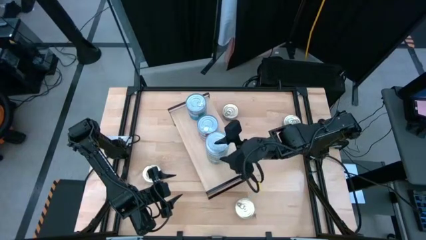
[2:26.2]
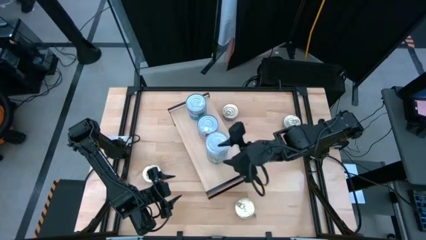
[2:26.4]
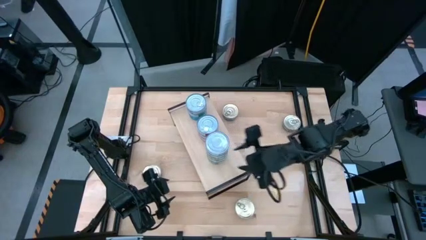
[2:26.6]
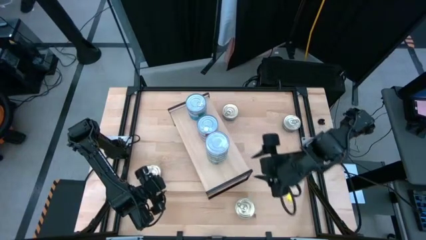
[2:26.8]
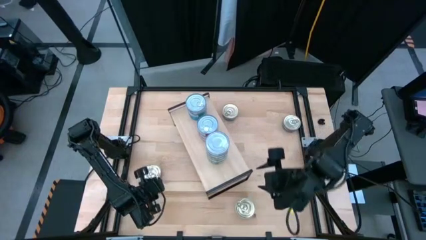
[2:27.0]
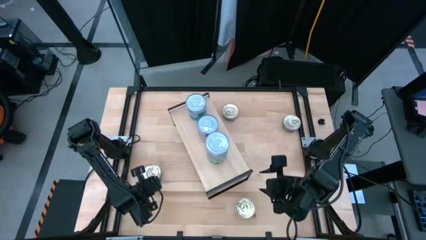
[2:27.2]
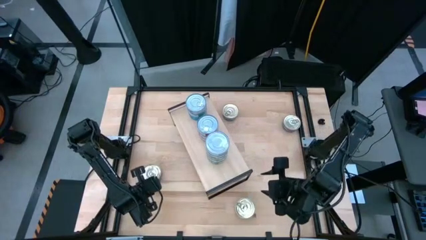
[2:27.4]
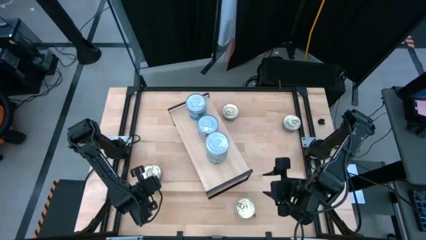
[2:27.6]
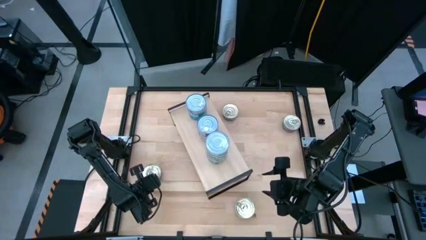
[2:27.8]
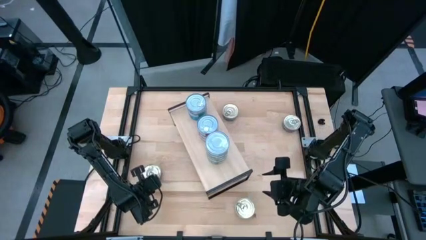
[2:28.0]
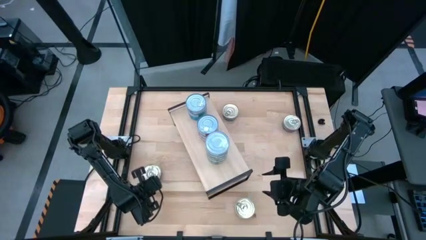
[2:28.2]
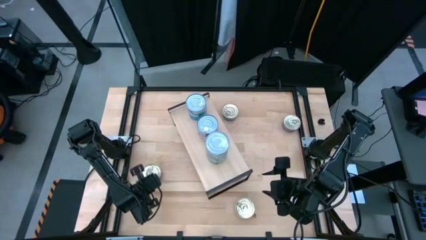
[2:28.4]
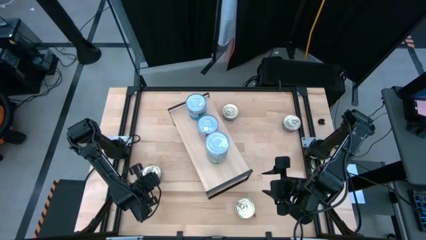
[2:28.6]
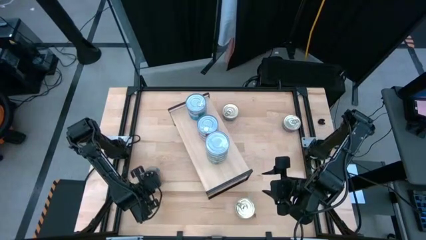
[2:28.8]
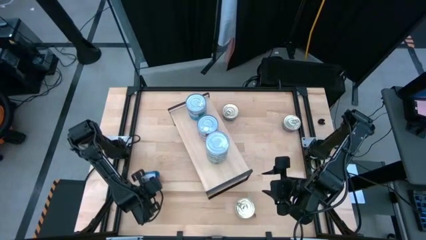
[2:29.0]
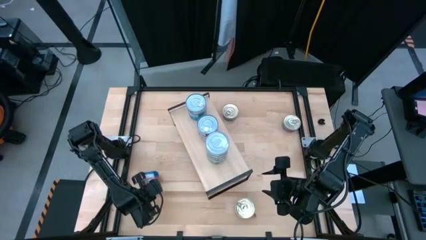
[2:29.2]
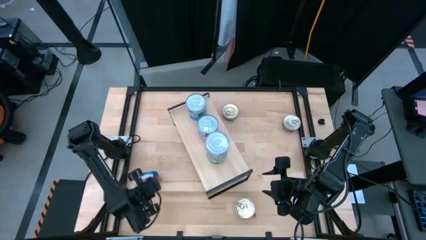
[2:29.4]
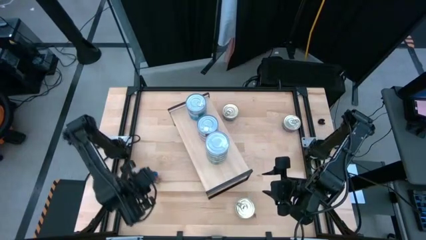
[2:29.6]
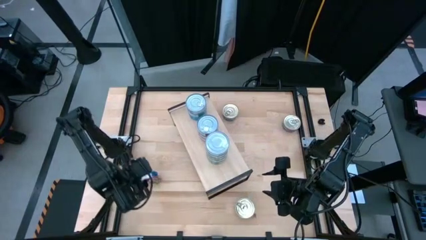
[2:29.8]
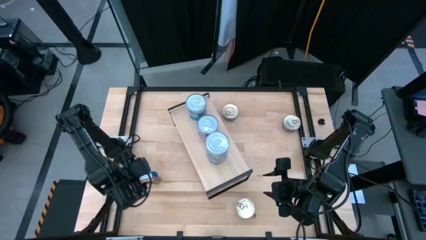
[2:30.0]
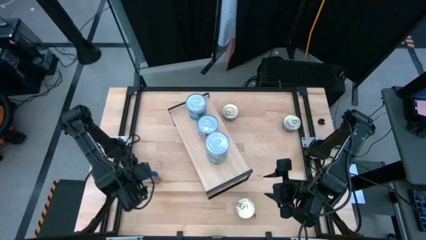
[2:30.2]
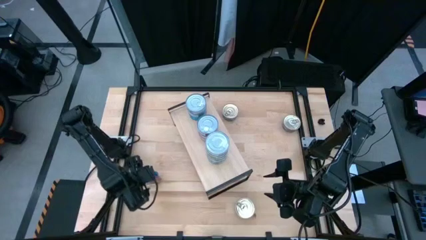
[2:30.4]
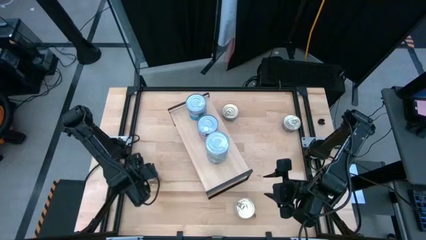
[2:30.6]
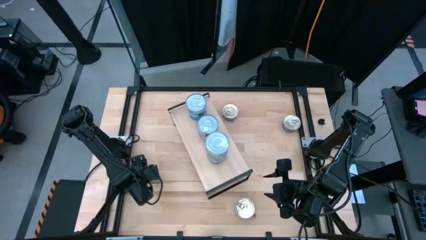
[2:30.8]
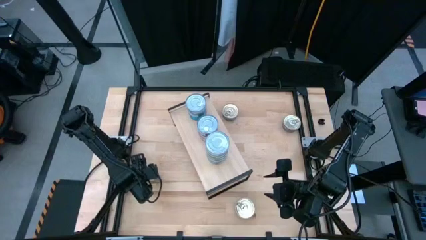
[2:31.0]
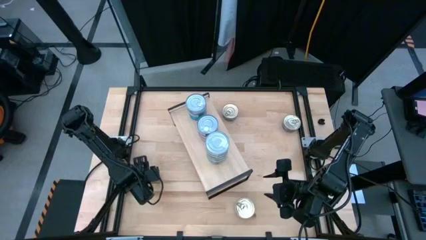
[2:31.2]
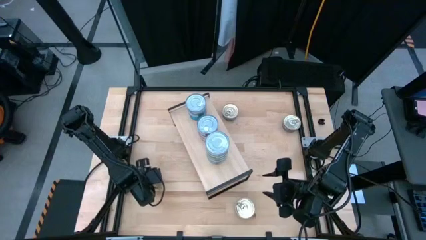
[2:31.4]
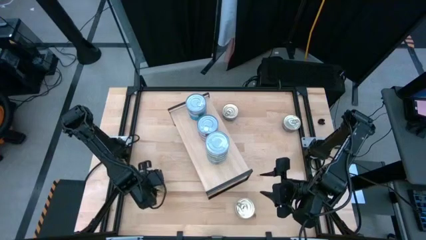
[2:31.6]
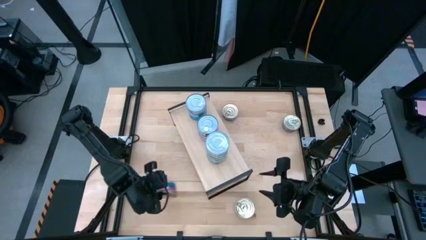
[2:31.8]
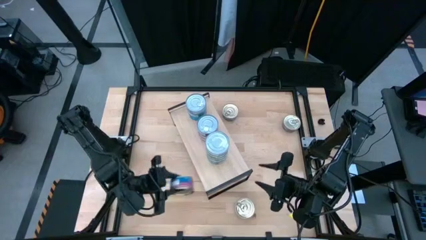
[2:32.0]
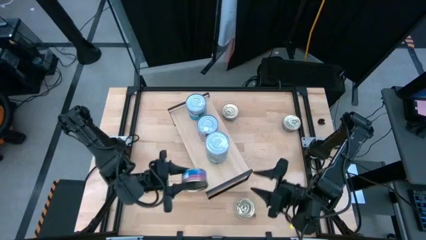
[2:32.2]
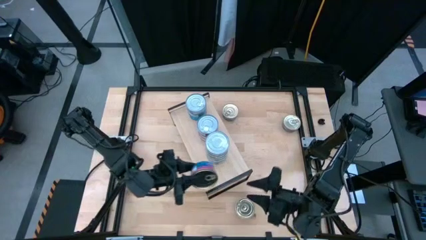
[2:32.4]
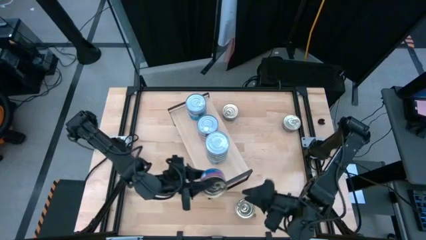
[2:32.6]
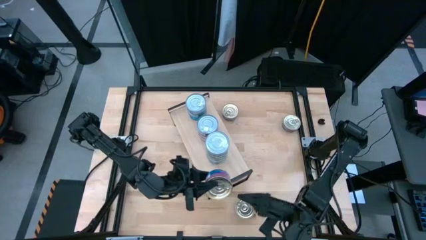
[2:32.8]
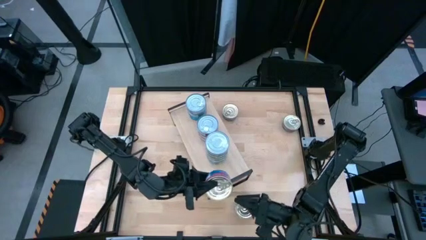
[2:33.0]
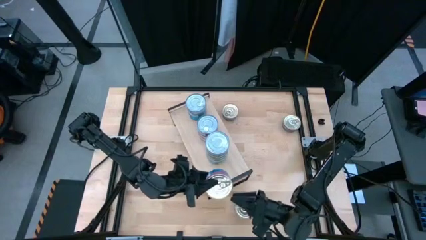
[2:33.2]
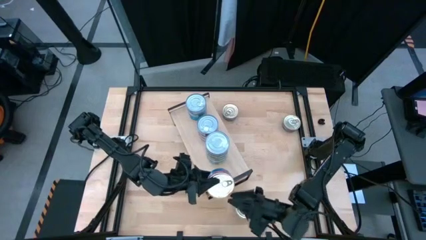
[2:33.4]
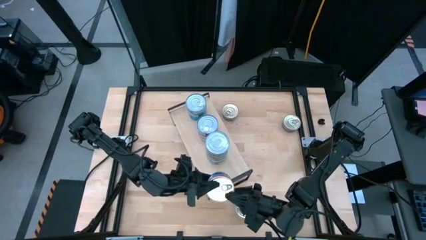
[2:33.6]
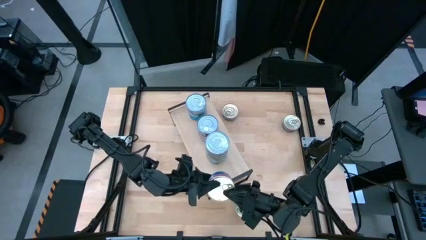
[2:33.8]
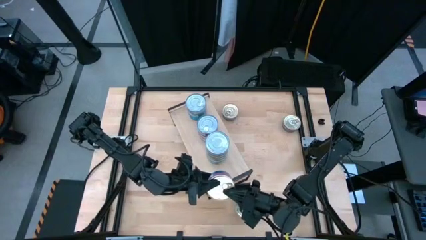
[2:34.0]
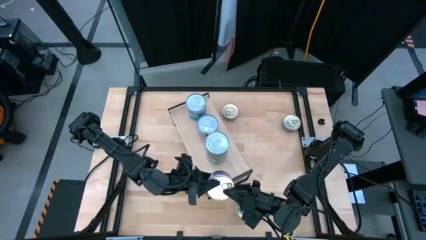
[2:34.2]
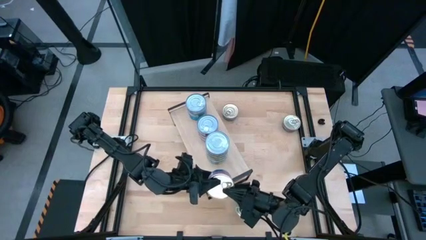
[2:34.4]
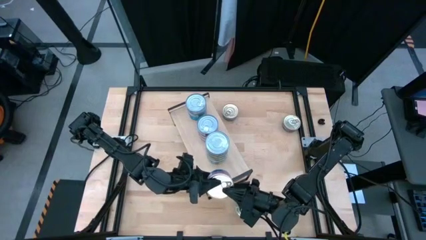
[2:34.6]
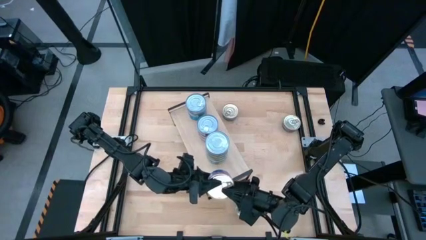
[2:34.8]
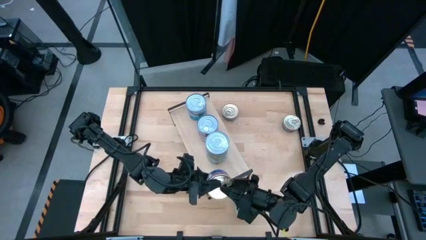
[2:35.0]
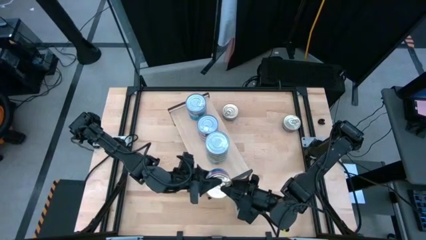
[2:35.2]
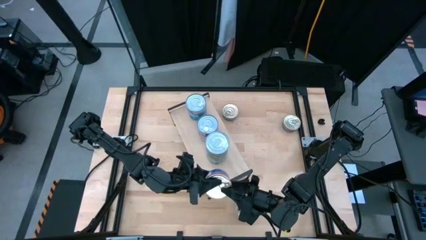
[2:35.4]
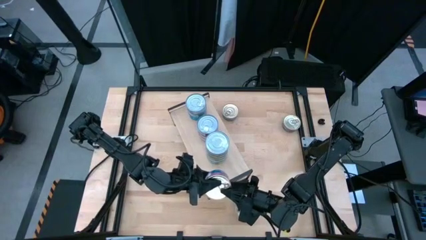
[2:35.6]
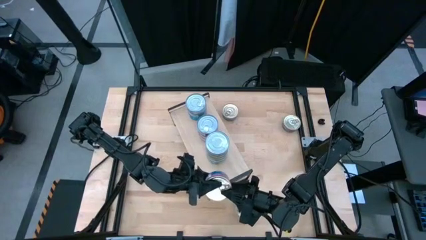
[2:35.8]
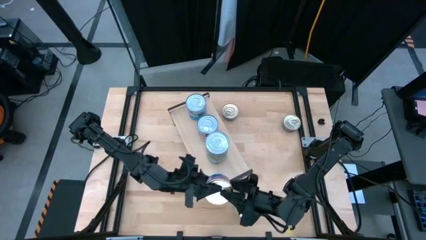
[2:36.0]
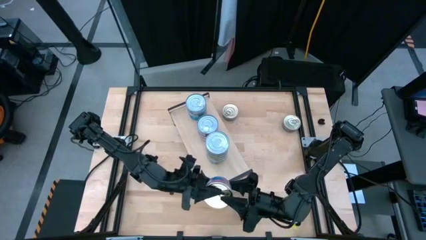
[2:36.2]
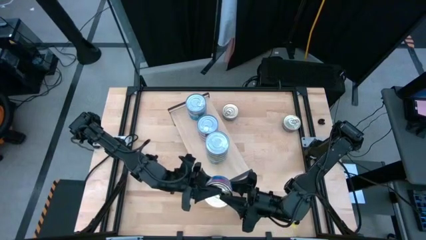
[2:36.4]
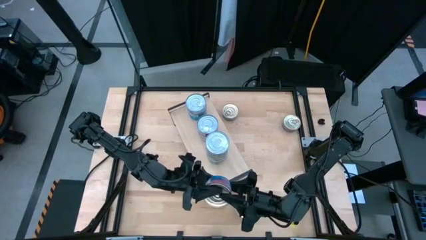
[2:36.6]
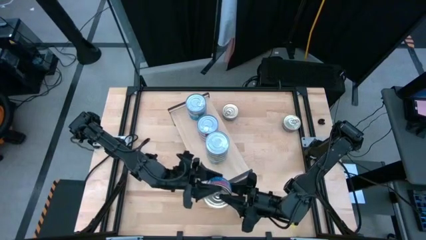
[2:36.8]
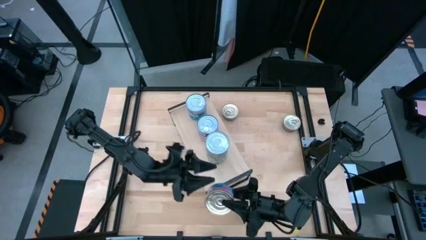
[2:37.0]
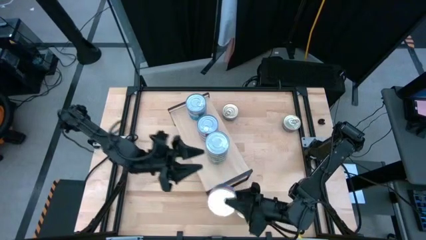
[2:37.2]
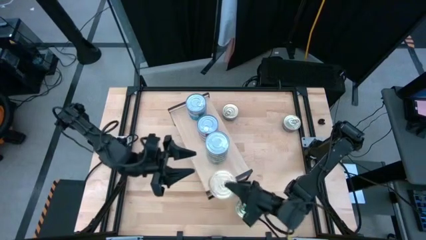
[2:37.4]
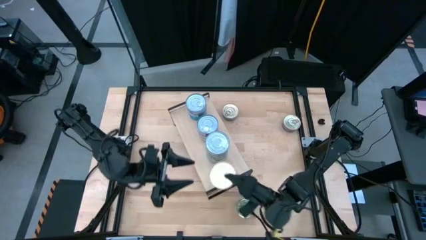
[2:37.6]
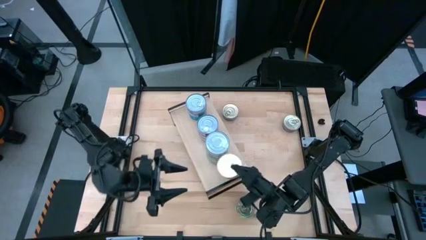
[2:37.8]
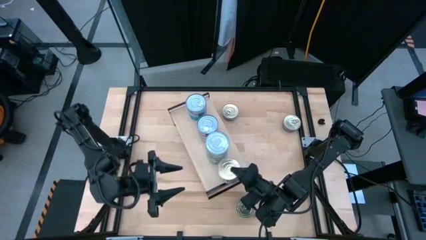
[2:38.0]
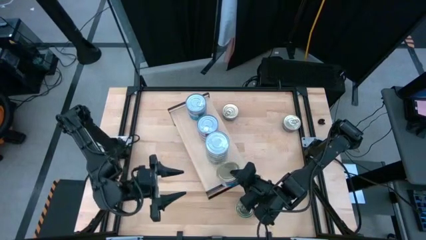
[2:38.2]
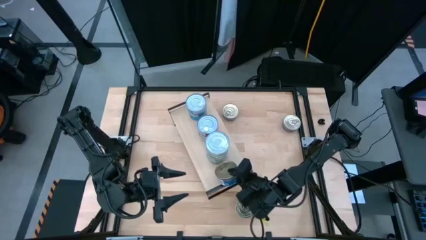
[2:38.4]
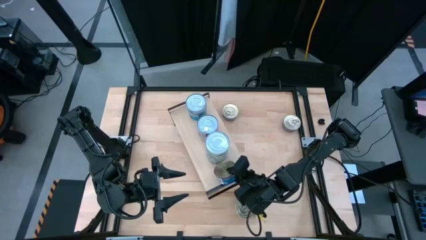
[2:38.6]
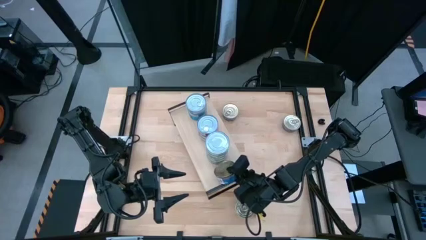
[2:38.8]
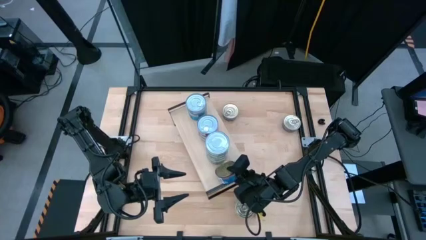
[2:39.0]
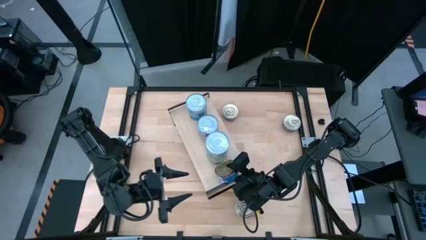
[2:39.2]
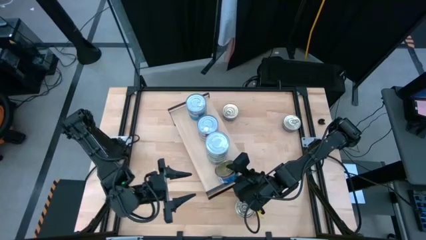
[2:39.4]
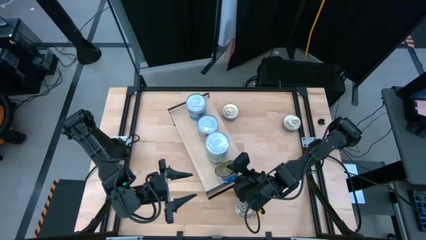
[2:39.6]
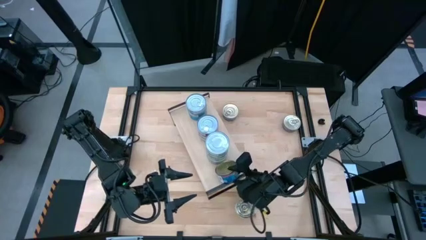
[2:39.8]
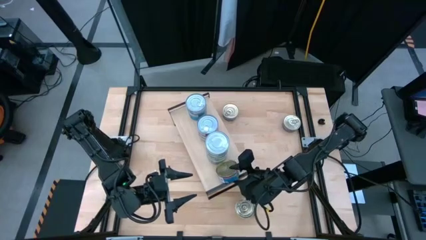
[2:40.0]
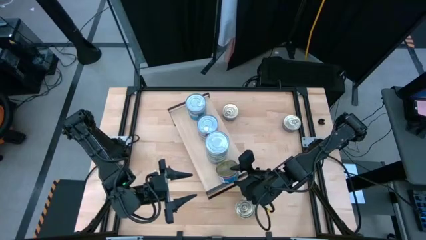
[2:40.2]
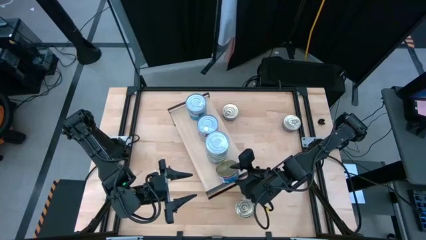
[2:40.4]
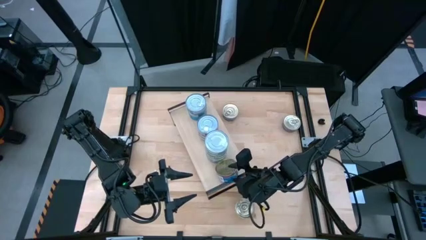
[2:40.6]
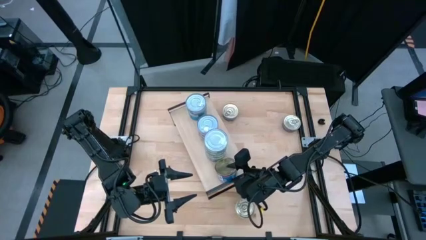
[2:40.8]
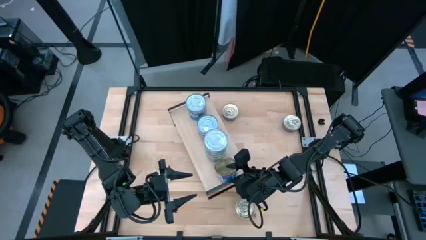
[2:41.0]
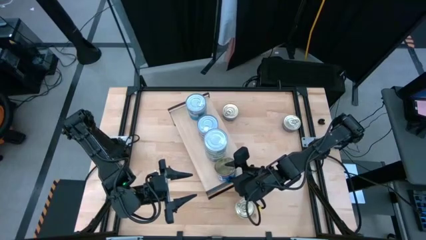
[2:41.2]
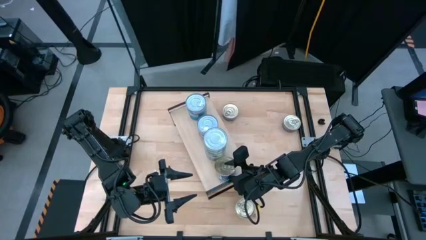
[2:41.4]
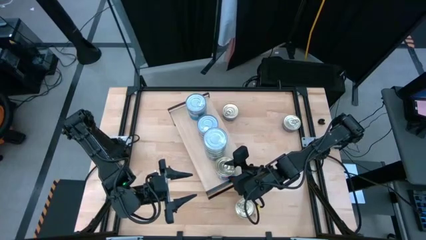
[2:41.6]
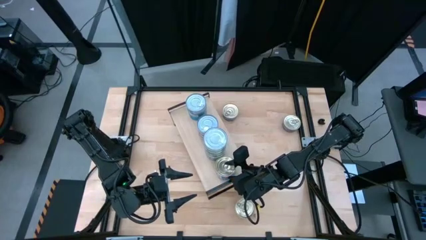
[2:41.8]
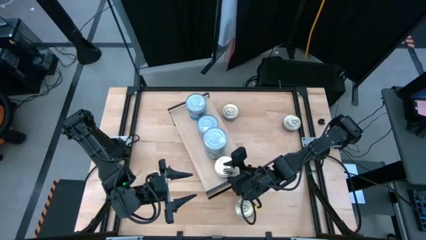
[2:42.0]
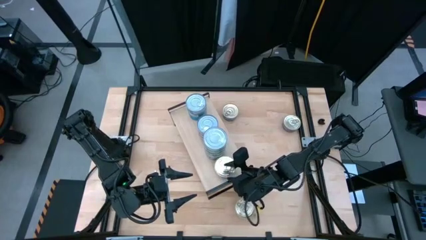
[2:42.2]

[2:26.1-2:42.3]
Task: Stack canned seafood by type on shelf
Put the blue-pink tuna can on the shelf

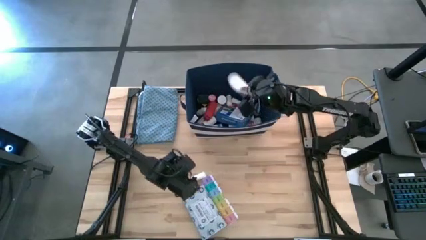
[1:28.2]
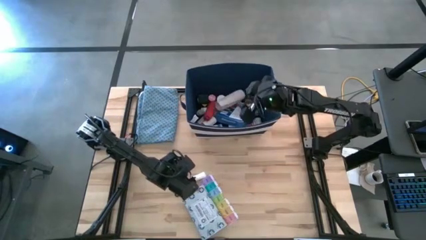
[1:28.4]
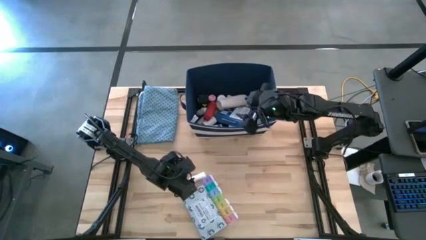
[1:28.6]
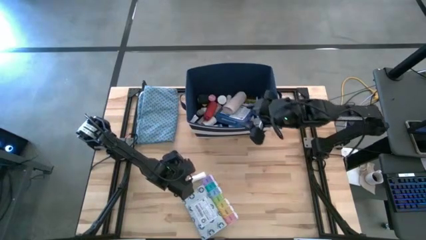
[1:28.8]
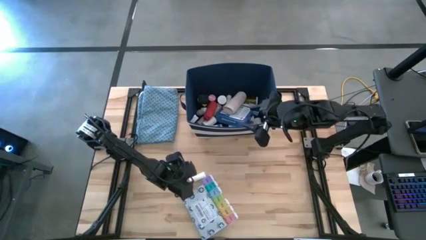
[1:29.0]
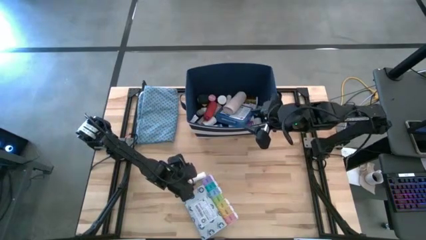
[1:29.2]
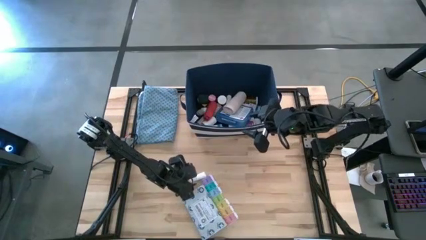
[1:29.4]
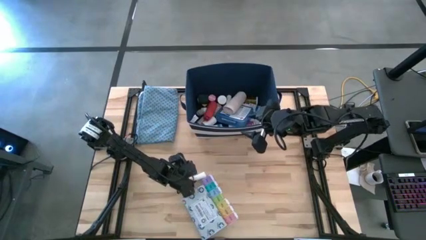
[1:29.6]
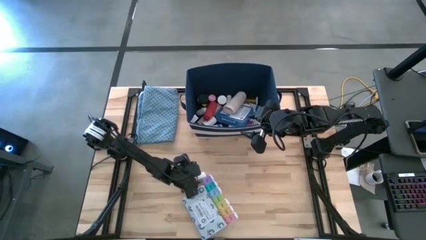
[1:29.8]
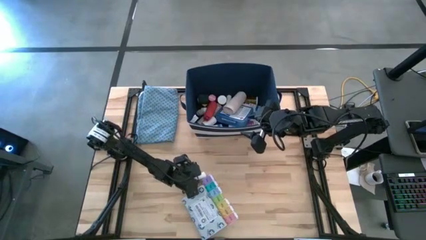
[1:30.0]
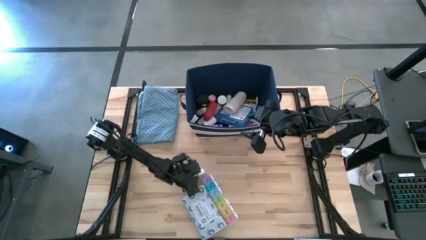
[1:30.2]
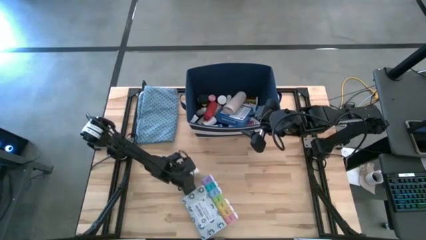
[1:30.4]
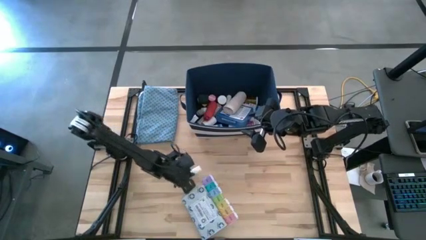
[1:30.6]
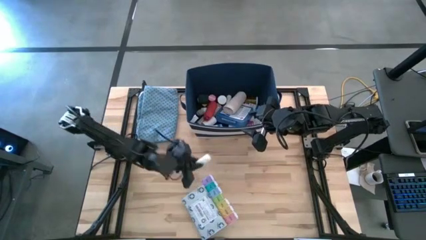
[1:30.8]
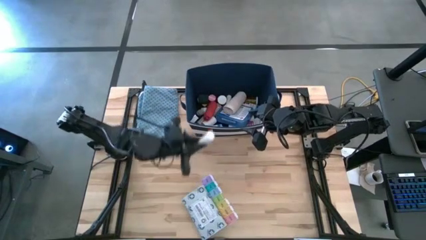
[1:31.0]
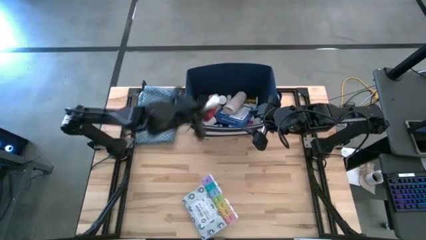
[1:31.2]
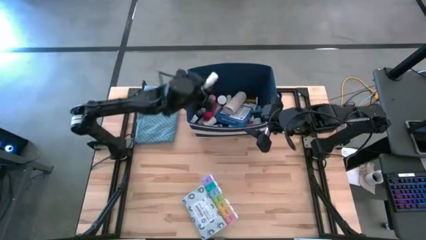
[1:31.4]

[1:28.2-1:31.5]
Task: Pick & place medical supplies in basket/bin
Put the white bandage into the blue bin
